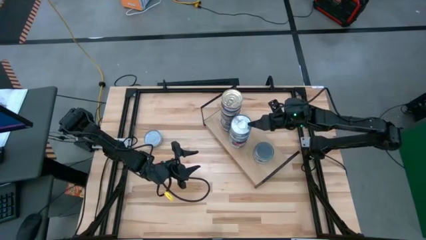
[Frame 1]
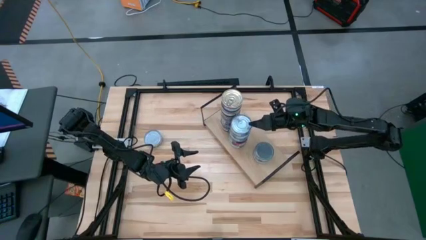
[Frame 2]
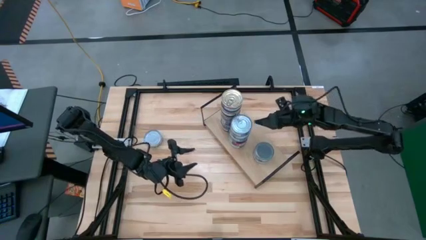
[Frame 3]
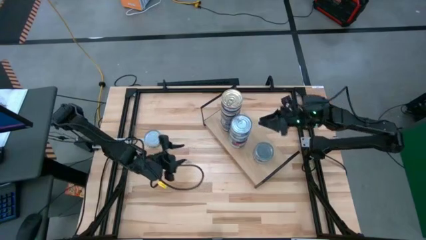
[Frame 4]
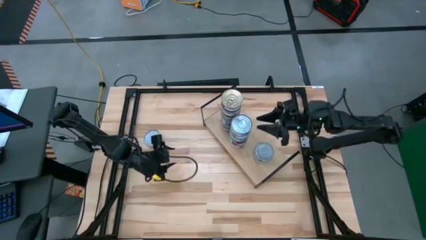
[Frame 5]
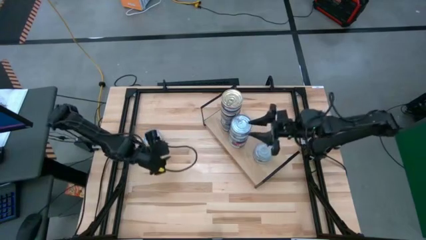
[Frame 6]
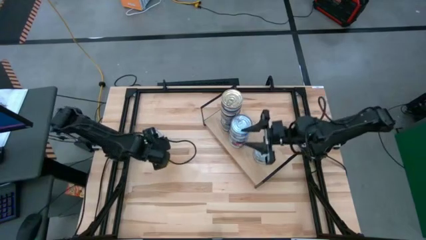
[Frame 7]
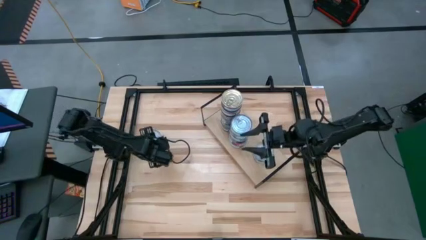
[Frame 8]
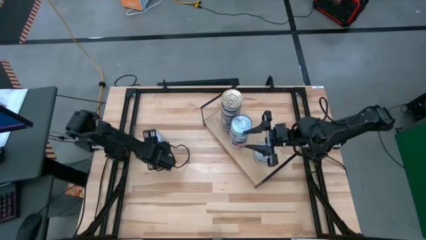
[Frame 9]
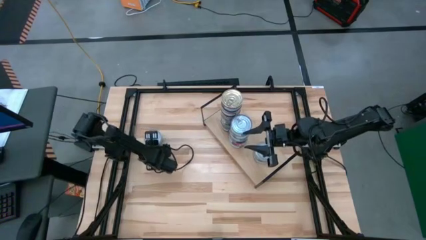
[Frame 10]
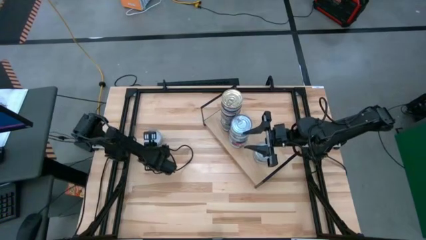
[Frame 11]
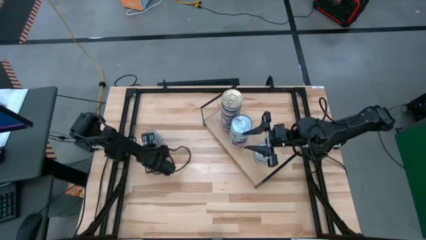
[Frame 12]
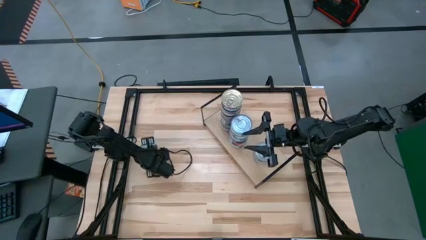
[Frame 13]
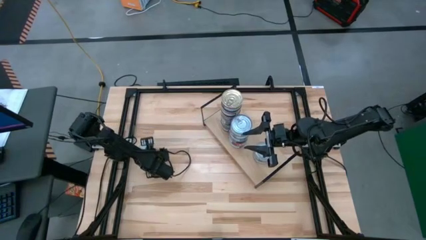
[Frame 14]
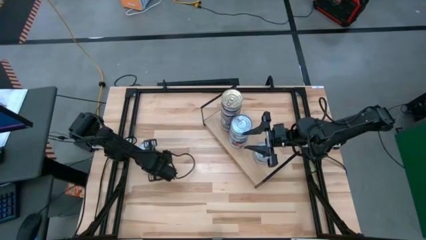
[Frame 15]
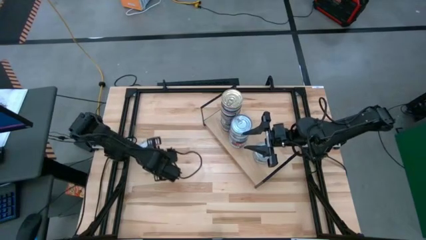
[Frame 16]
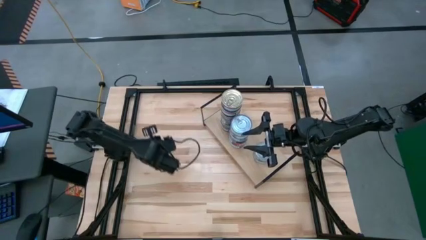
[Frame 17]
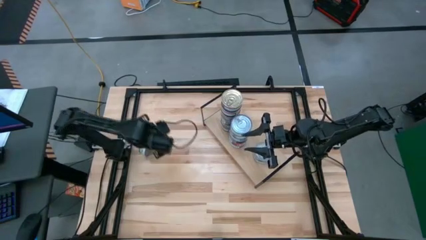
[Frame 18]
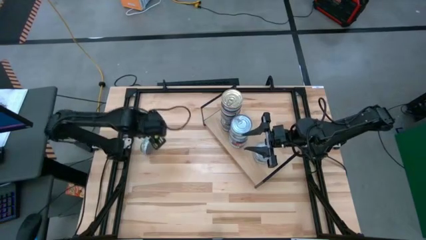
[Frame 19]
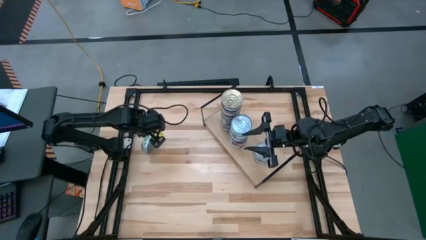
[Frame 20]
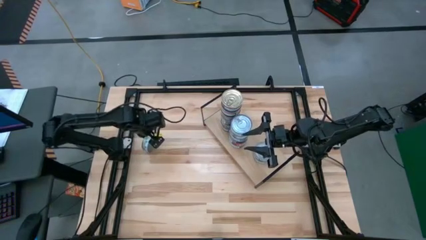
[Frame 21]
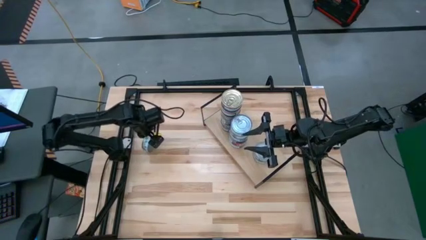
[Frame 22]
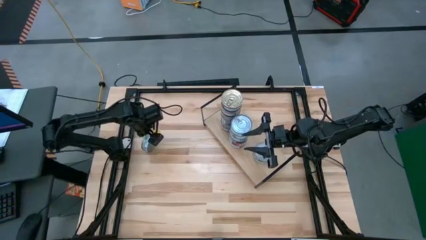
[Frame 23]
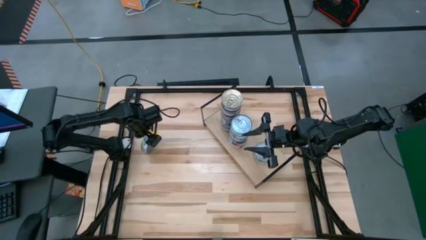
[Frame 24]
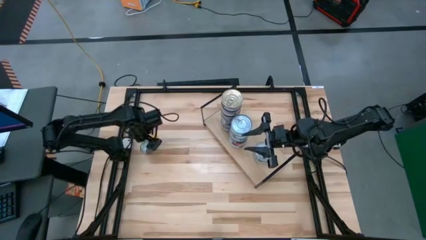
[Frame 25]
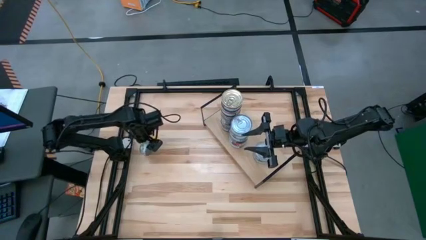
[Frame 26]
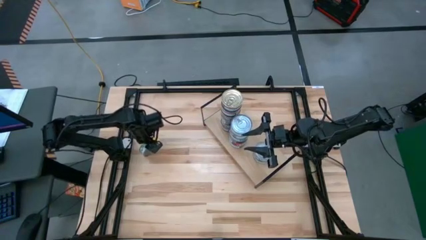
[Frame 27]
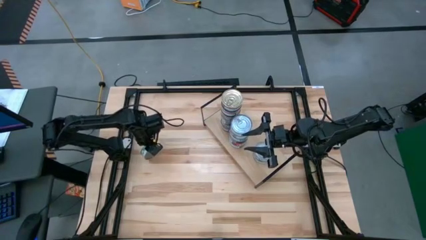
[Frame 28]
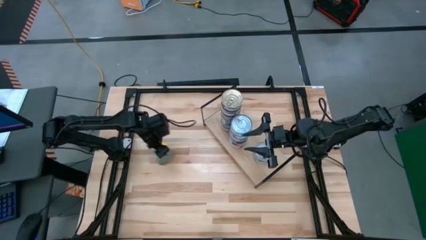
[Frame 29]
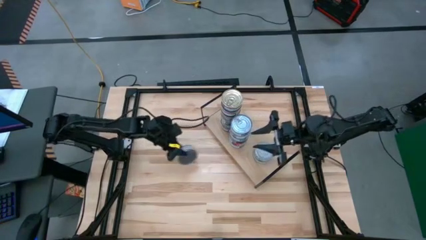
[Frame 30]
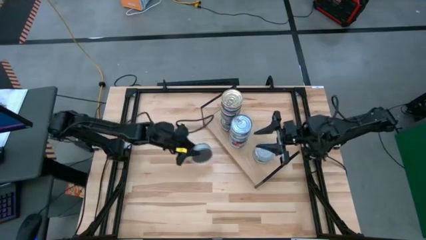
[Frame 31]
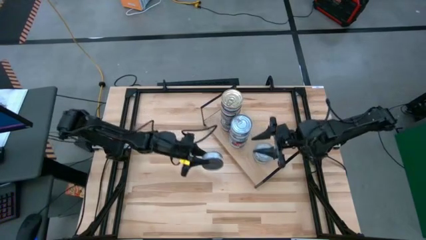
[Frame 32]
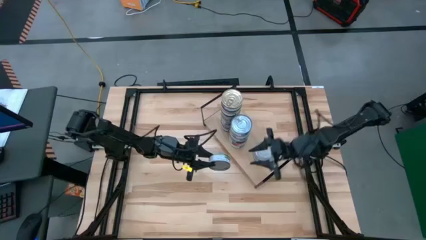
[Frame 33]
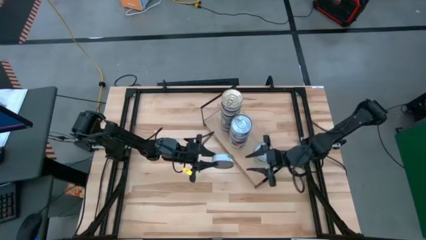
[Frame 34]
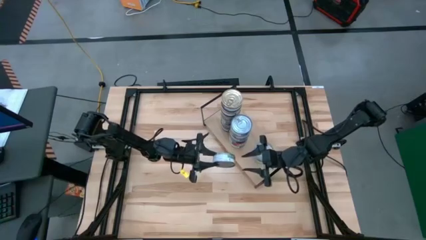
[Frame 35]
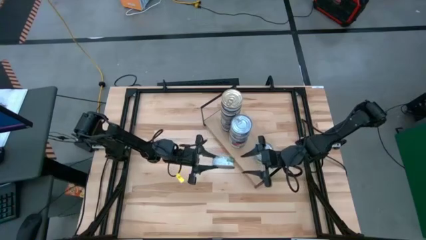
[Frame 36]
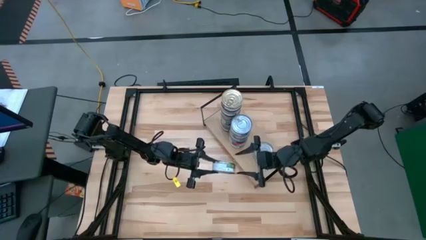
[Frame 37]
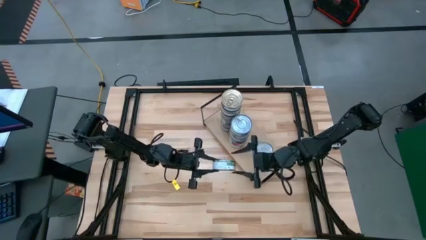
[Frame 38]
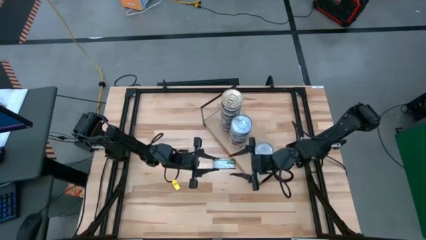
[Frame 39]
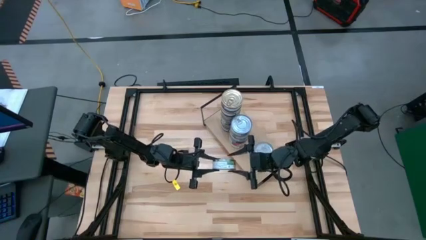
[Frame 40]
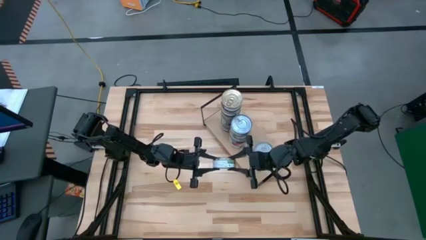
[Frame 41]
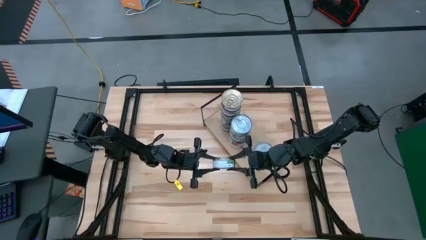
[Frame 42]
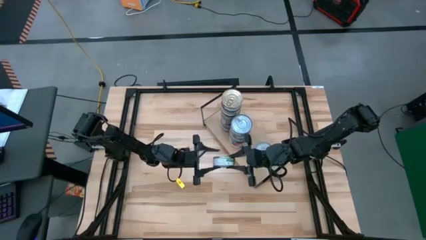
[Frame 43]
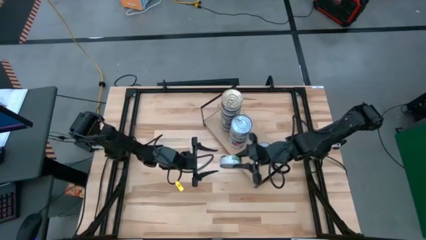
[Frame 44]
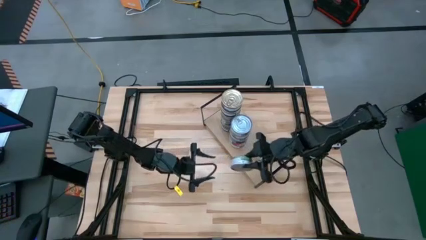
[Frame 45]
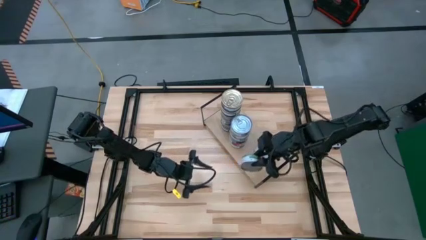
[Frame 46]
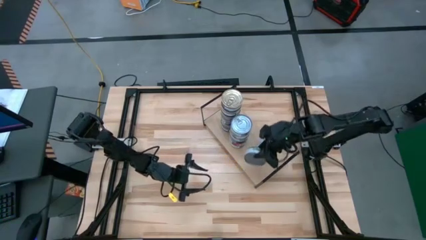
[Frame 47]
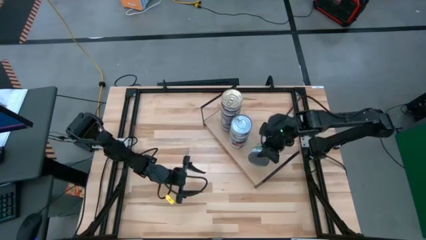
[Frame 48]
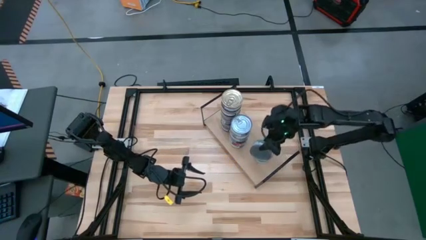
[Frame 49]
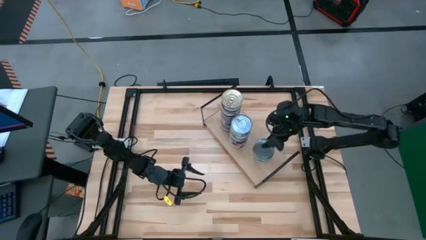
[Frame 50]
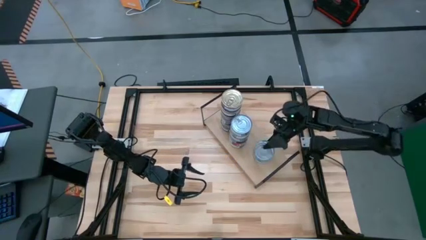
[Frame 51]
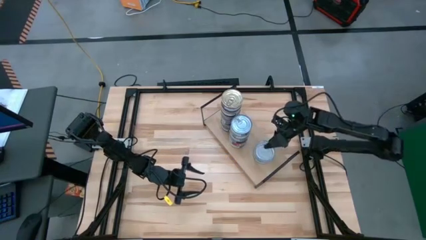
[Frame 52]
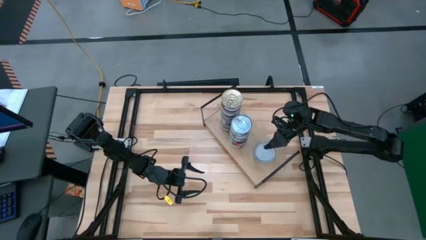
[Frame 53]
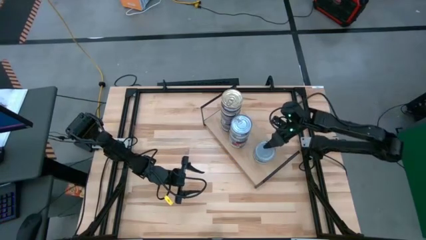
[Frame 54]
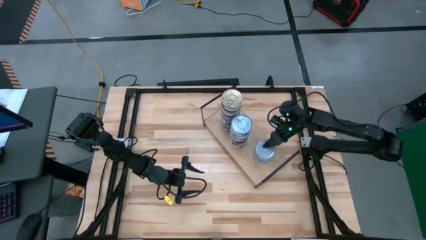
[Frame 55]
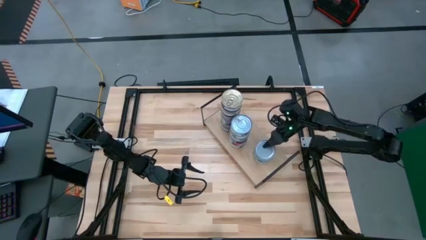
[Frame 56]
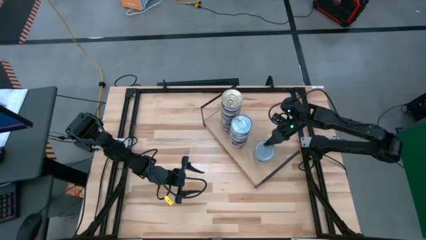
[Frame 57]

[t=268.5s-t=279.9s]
Task: Stack canned seafood by type on shelf
Stack the green tuna can on top of the green tuna can on the shelf

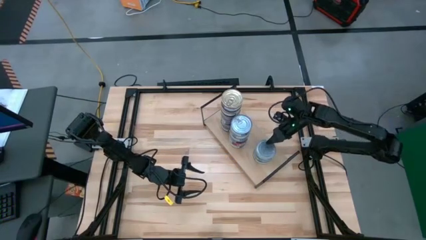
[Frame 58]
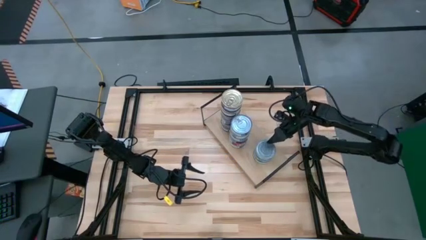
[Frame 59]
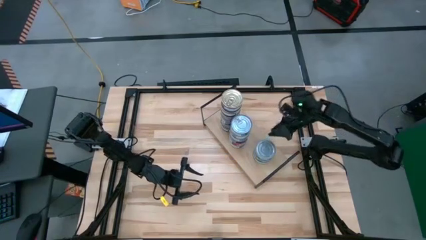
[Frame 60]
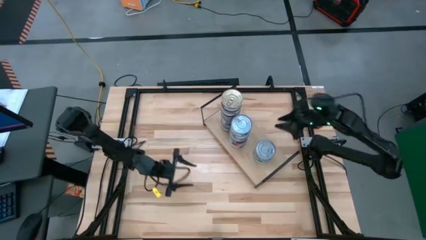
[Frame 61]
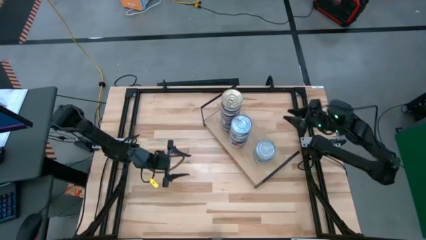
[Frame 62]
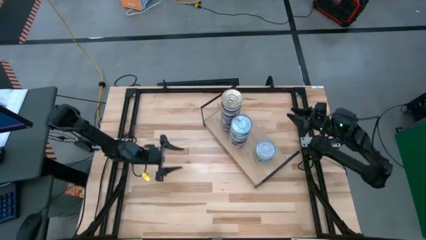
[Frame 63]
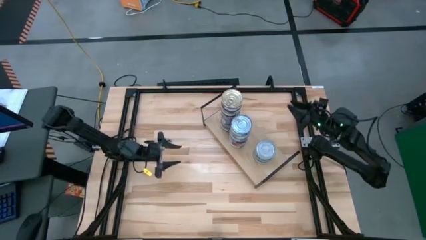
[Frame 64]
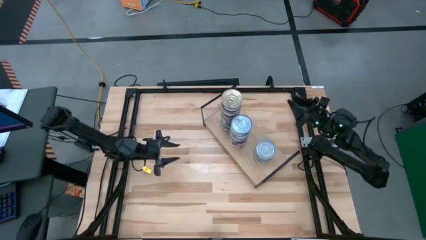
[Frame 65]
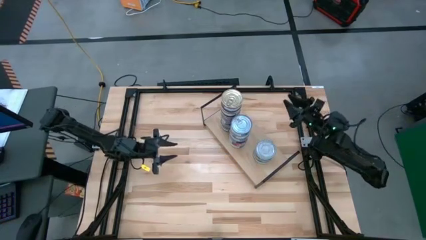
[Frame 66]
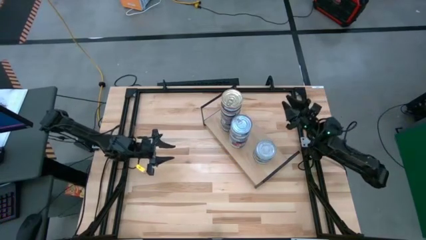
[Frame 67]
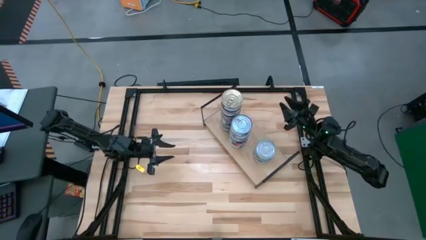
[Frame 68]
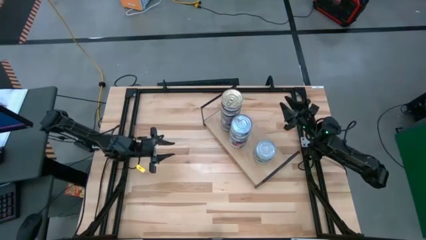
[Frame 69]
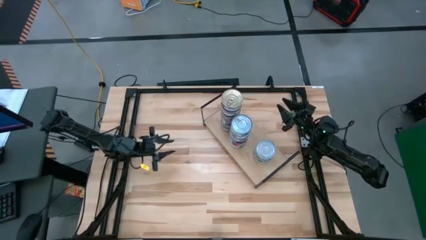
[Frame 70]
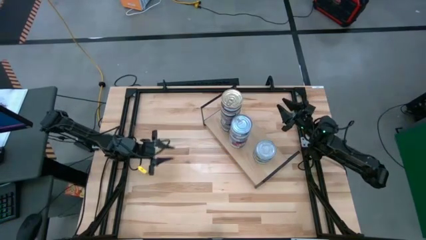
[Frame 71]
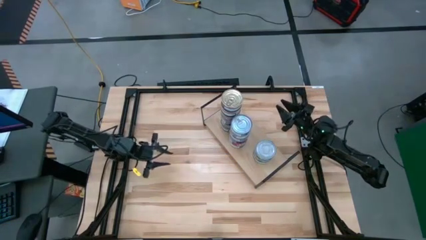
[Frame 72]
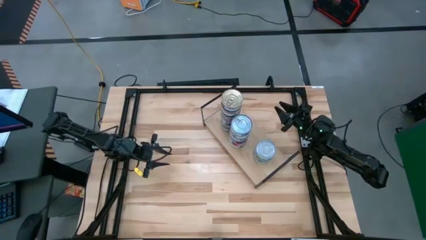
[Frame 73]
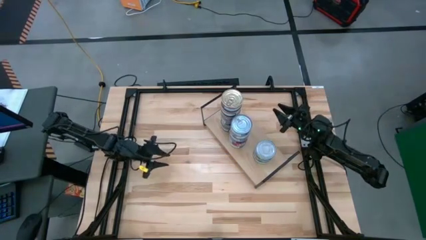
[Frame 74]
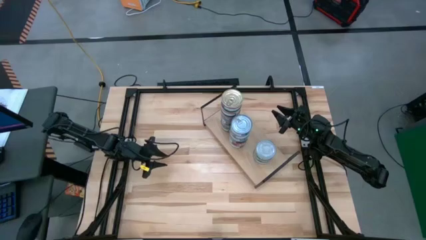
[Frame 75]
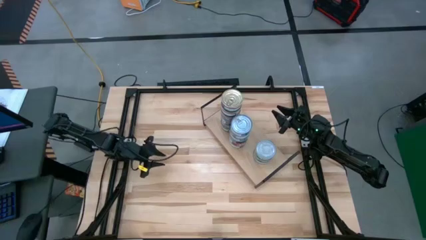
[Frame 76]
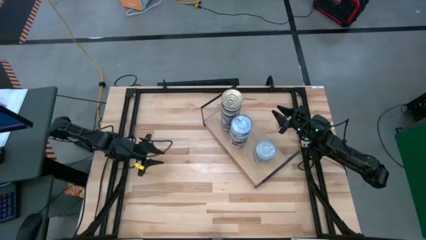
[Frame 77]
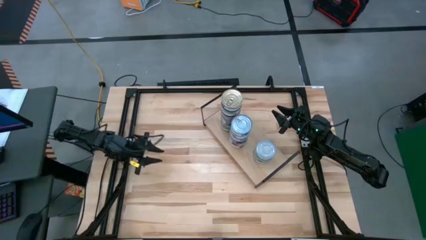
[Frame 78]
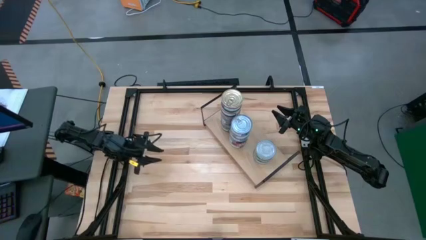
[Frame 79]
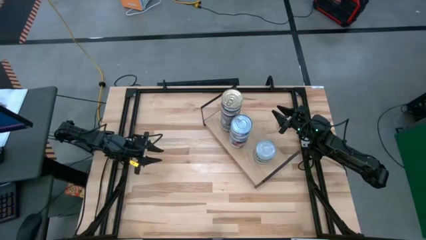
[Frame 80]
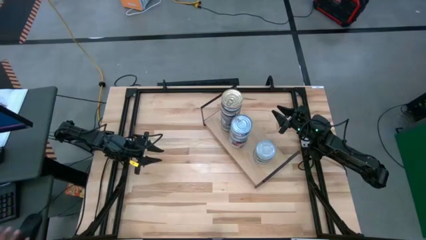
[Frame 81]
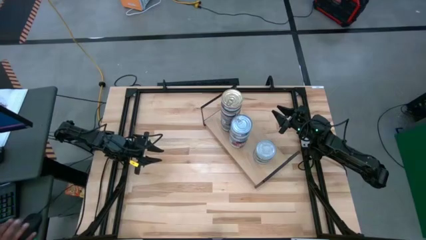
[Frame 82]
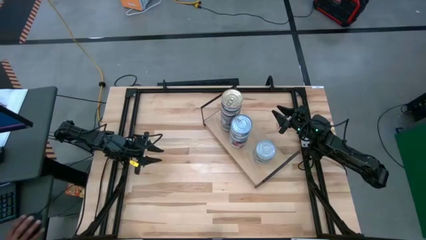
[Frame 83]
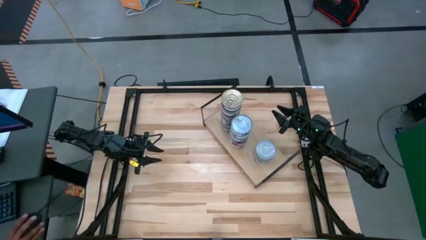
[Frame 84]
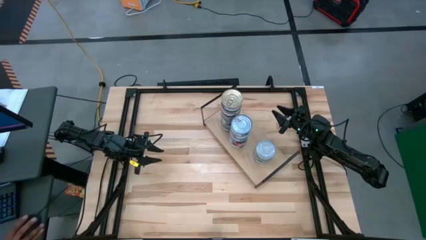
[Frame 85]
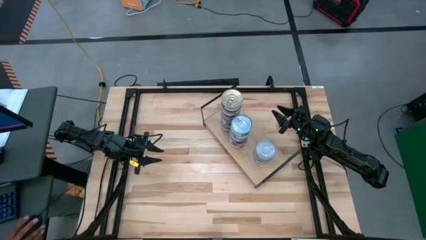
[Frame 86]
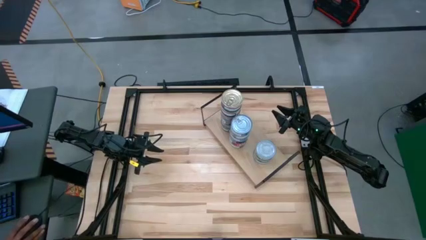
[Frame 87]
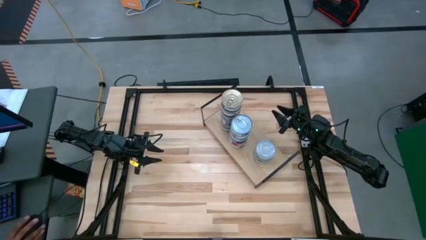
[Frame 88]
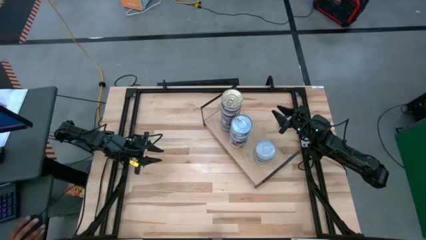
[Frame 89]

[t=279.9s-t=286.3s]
Return to Home Position
